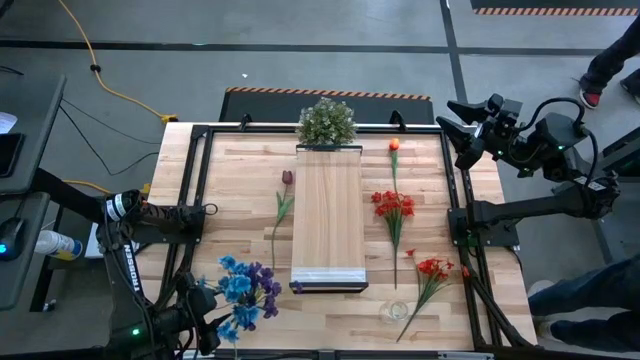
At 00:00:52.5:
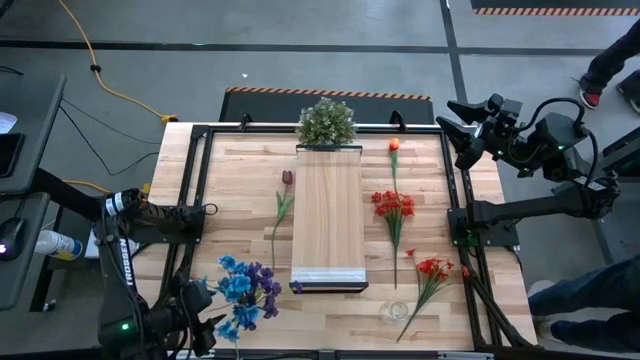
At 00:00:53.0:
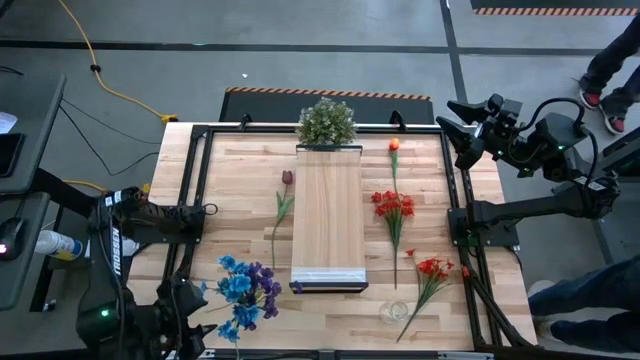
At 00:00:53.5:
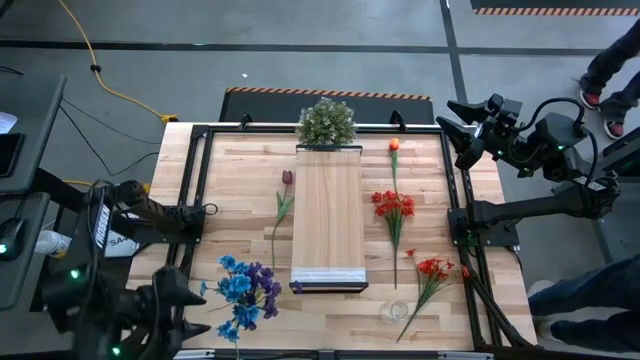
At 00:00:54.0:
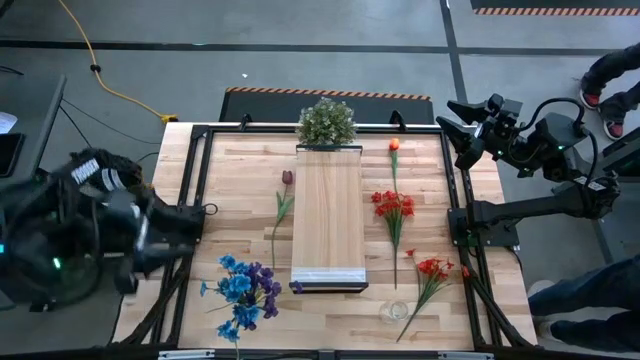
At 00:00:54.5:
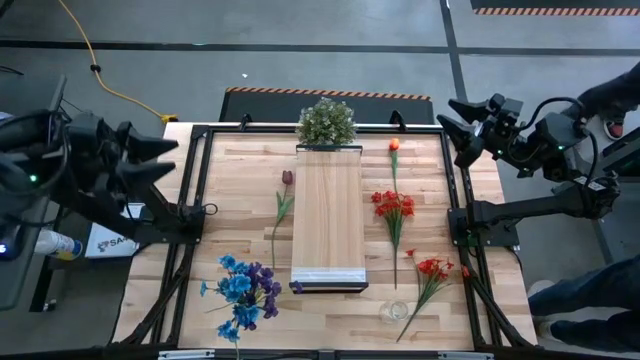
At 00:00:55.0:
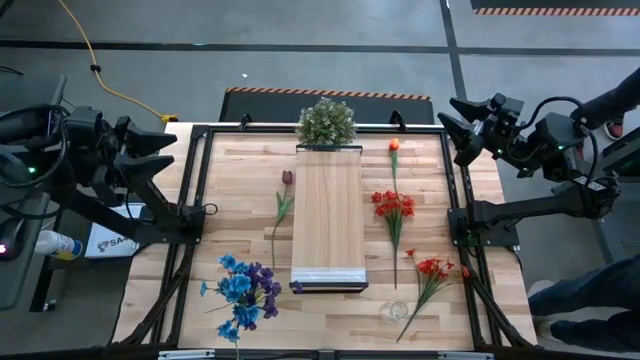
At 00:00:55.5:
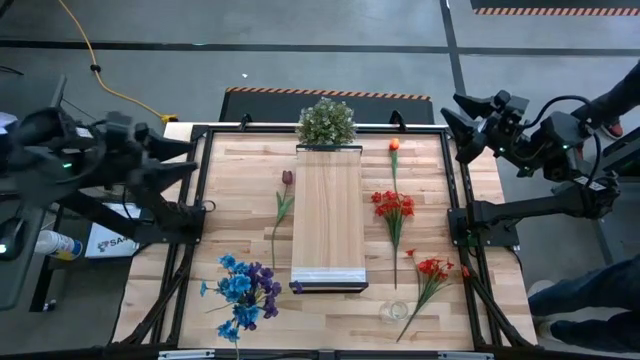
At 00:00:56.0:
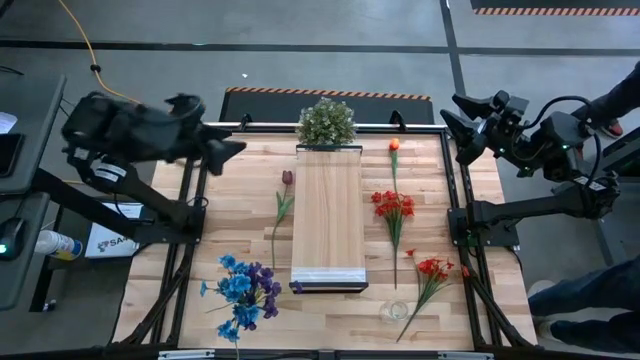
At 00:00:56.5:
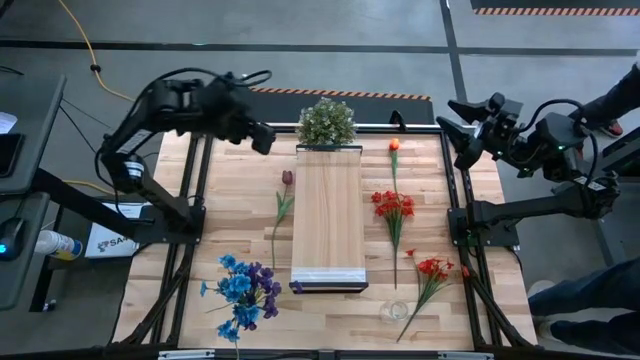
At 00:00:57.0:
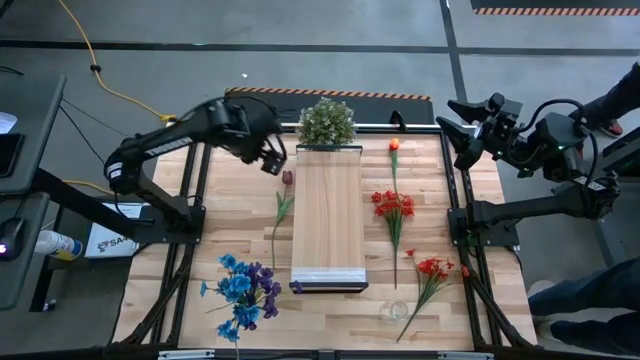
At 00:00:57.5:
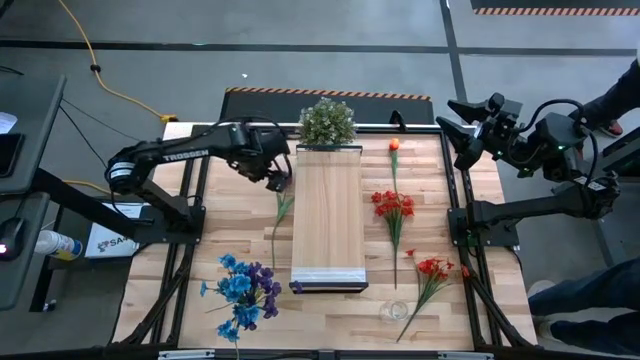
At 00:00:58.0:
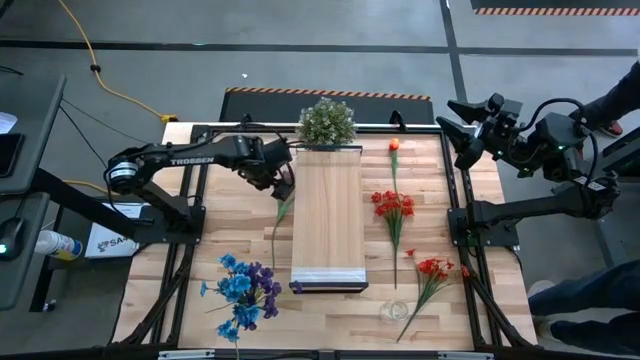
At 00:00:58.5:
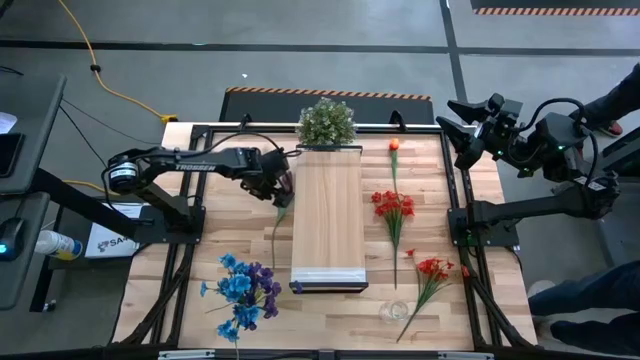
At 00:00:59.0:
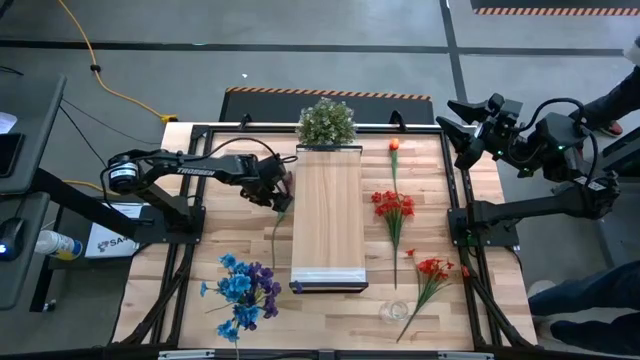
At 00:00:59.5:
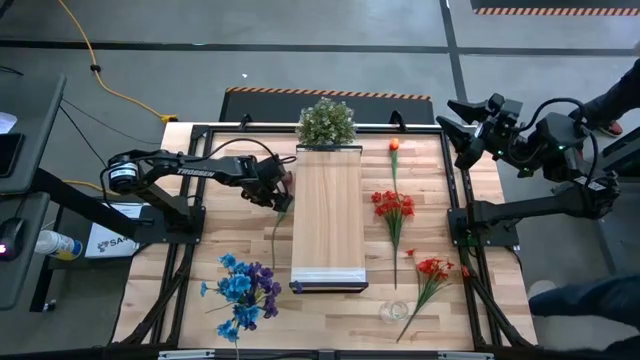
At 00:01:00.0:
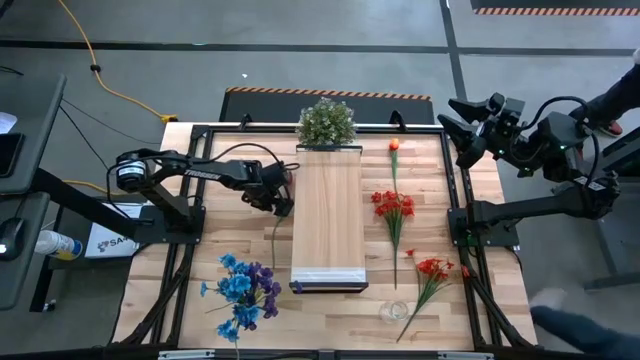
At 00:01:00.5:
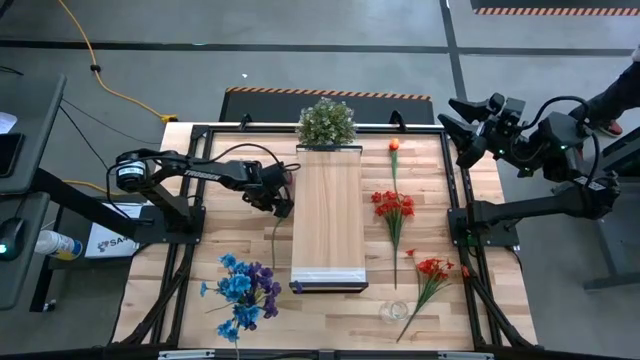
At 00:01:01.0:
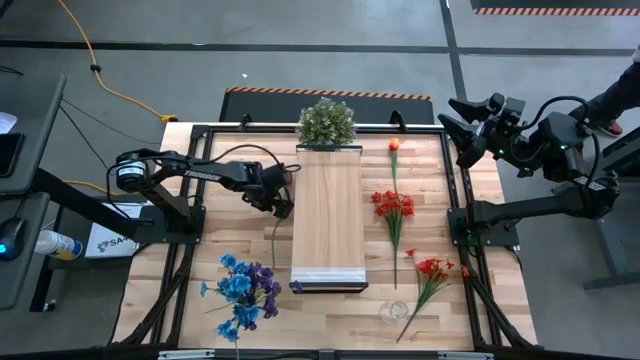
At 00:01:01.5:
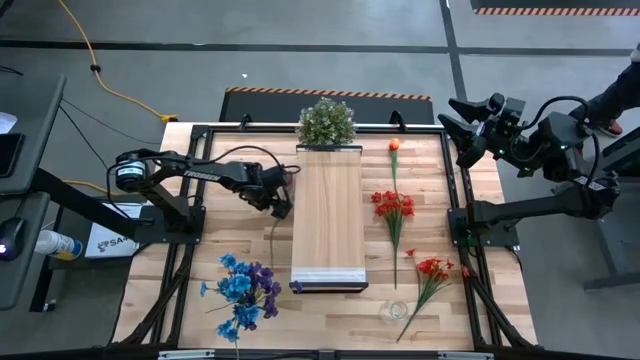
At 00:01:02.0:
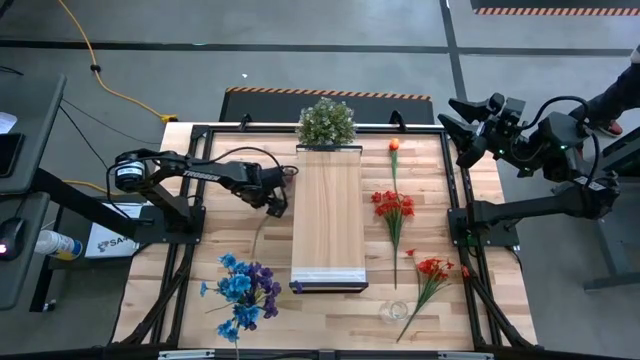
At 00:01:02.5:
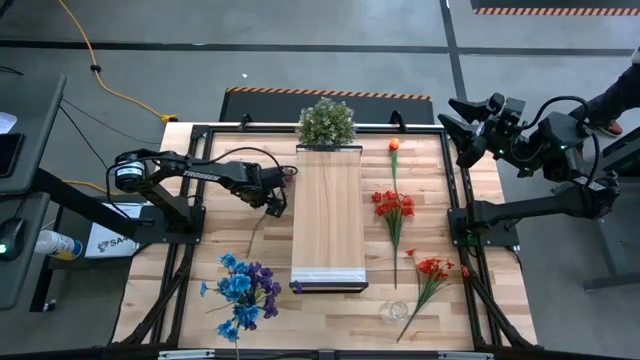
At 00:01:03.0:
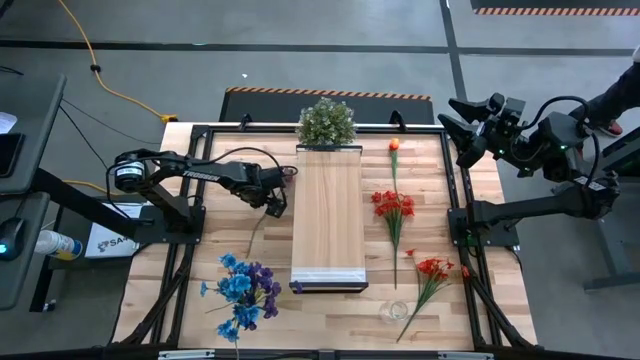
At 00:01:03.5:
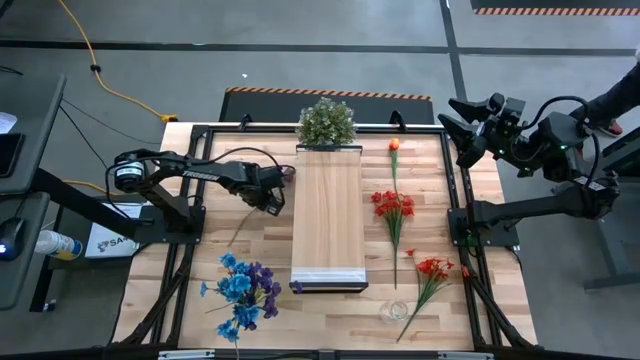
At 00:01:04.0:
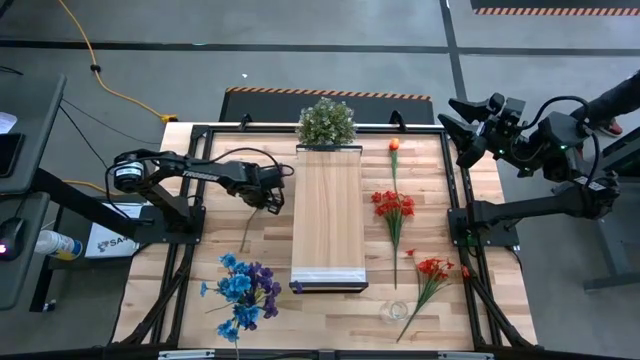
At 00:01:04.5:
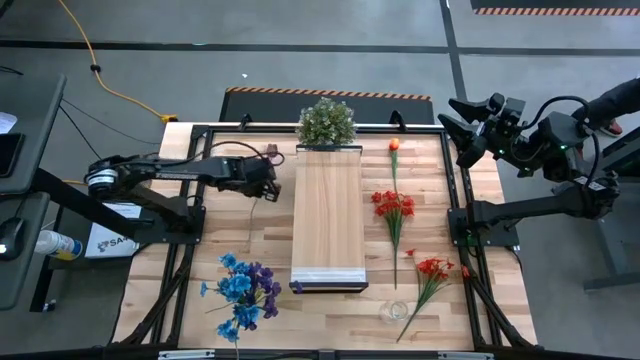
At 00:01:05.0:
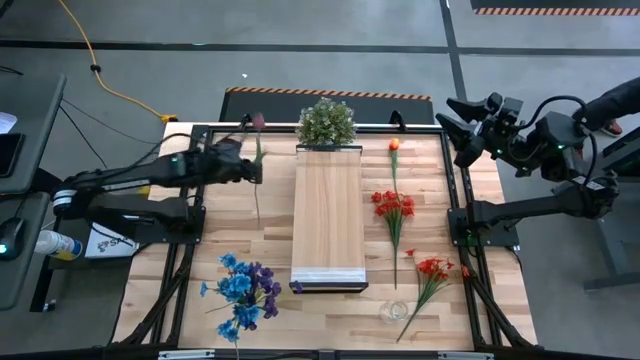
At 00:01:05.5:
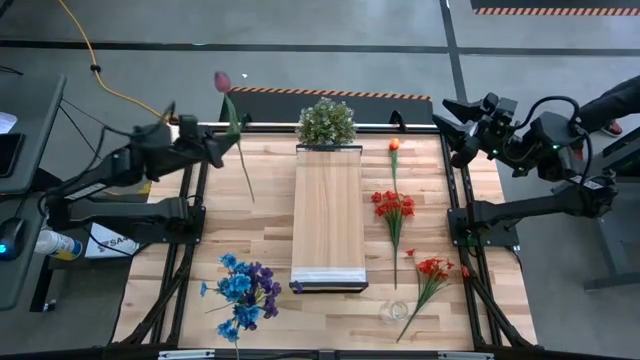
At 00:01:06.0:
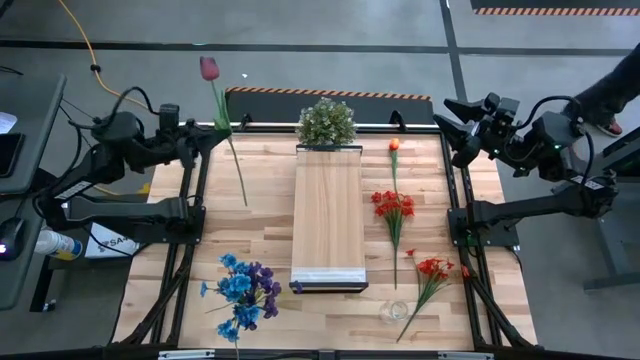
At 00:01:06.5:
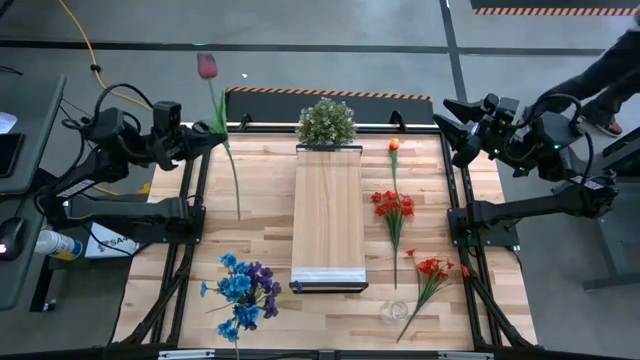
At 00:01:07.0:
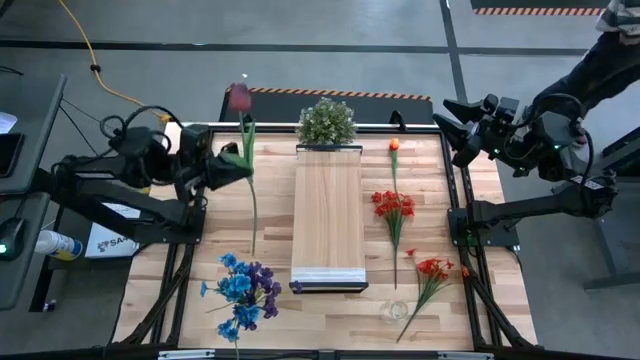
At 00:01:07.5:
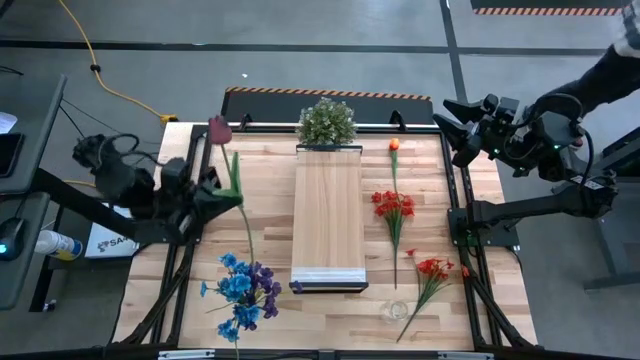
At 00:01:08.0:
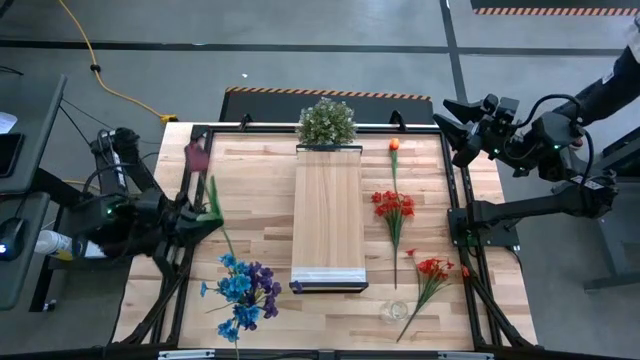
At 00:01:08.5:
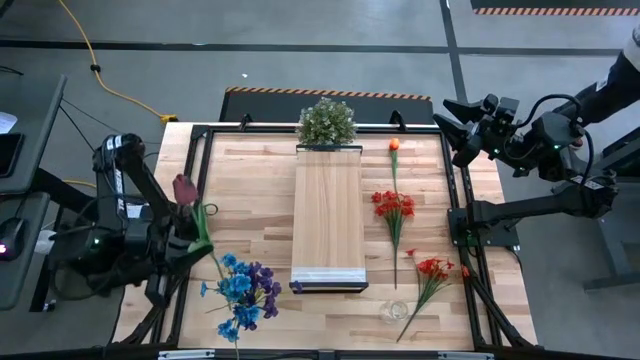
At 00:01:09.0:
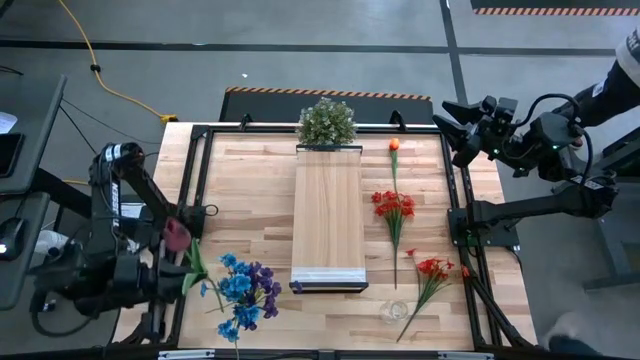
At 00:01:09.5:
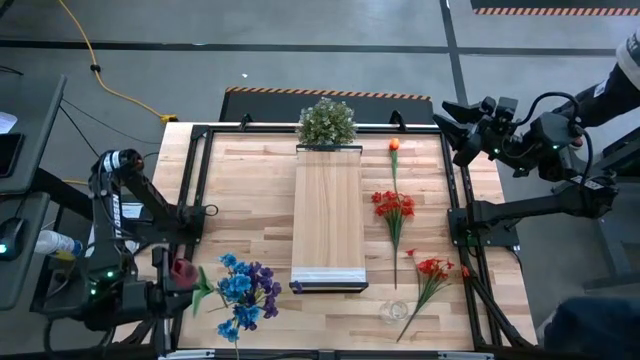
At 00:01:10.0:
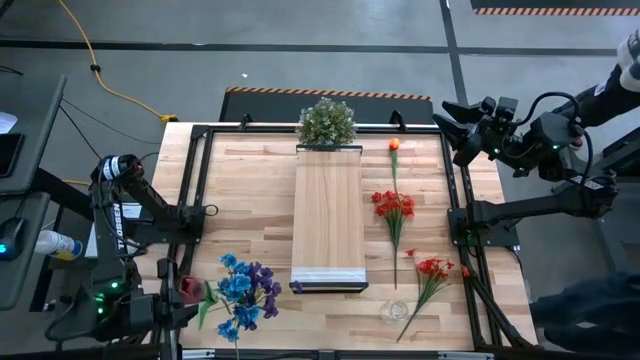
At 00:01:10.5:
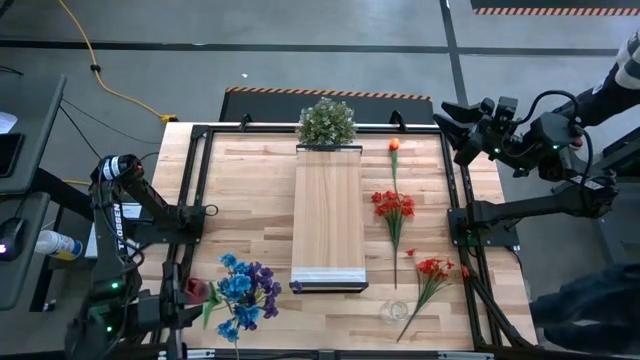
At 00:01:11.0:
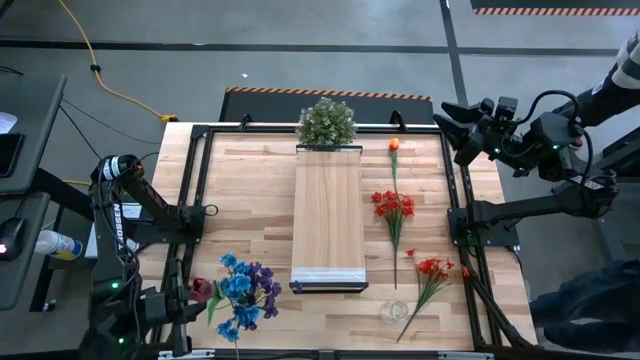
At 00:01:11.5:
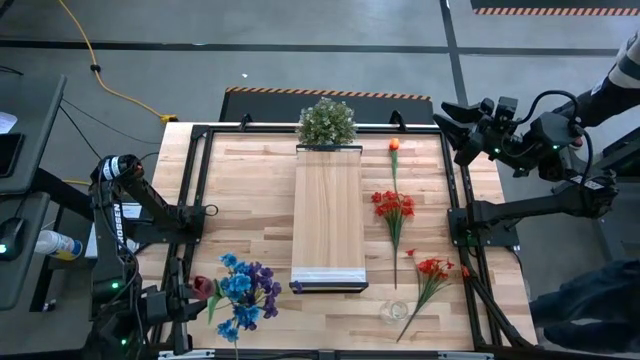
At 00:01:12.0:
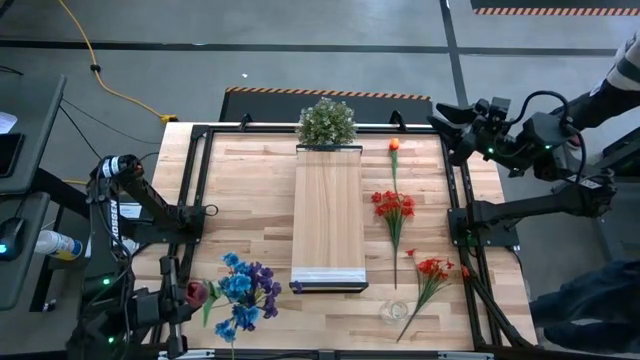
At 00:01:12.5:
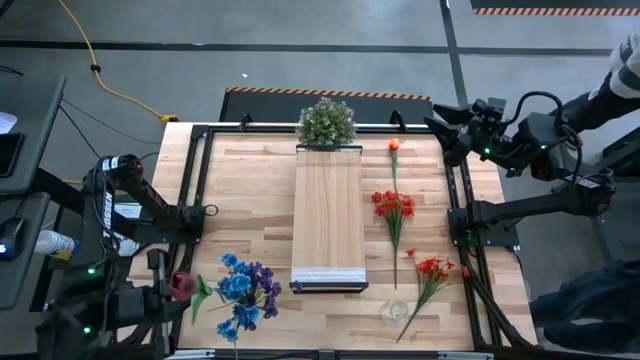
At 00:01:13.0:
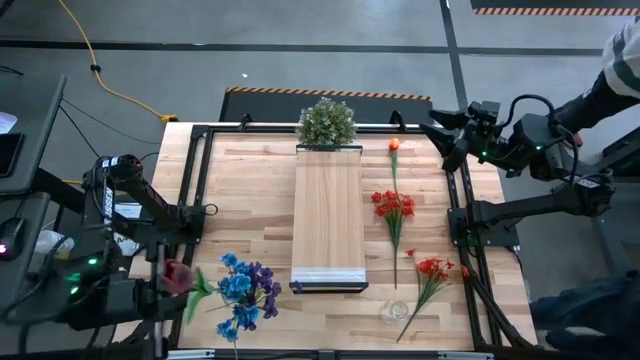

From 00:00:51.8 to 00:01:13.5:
Task: Pick and place flowers into a vace then onto a shelf
Put the red tulip into the left transparent vase
